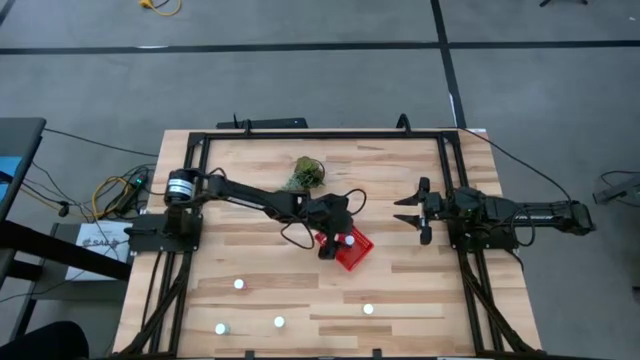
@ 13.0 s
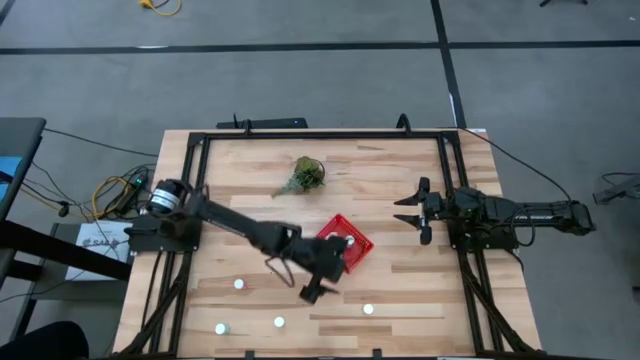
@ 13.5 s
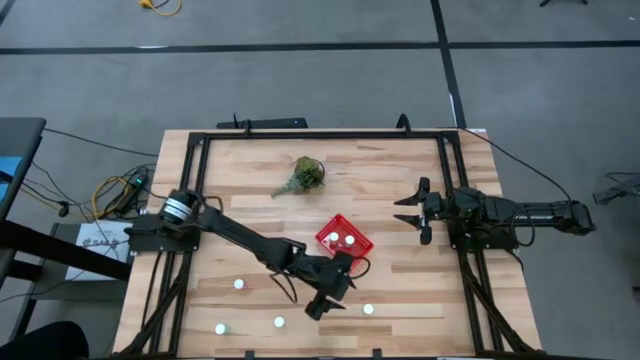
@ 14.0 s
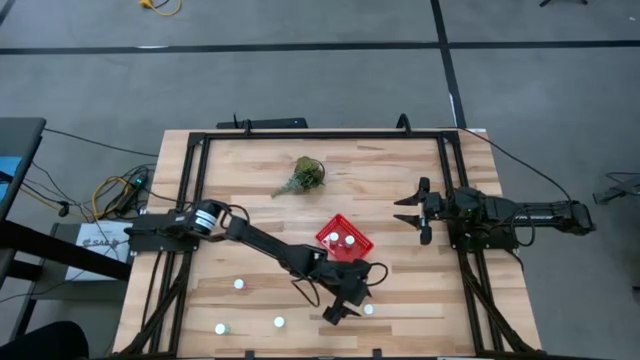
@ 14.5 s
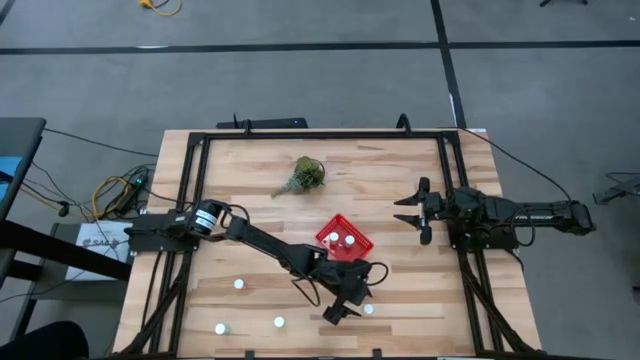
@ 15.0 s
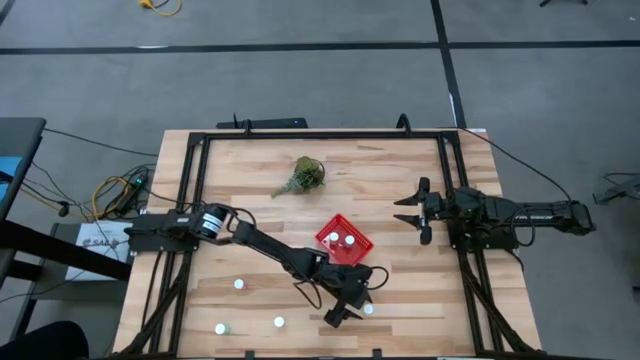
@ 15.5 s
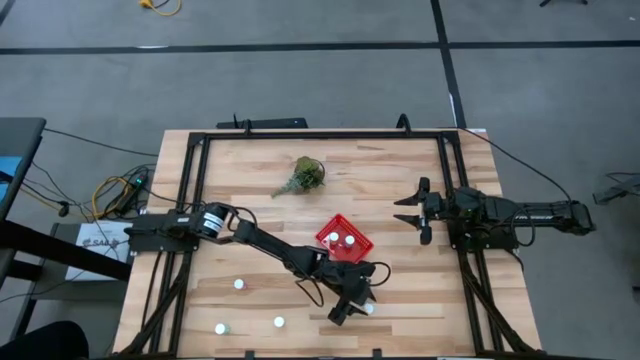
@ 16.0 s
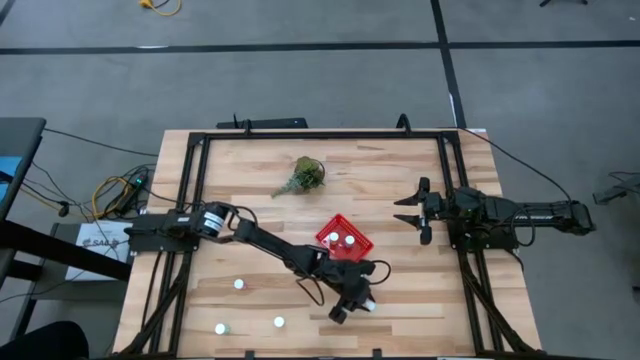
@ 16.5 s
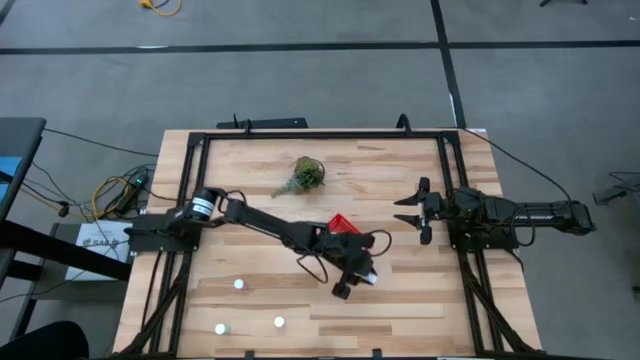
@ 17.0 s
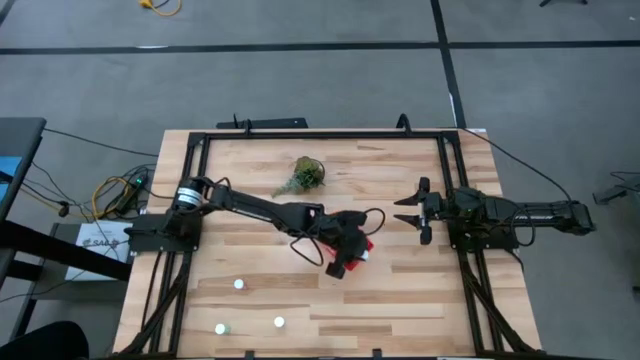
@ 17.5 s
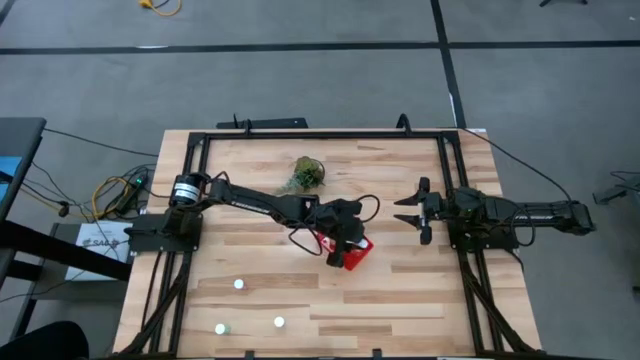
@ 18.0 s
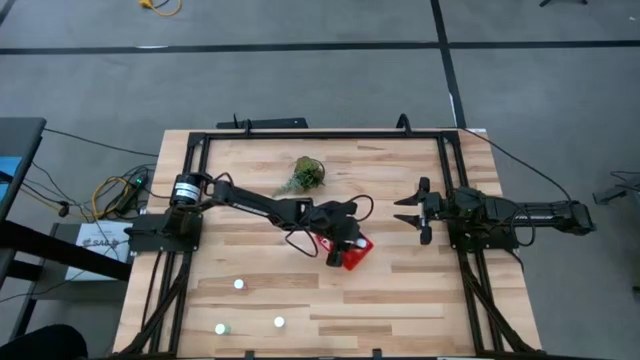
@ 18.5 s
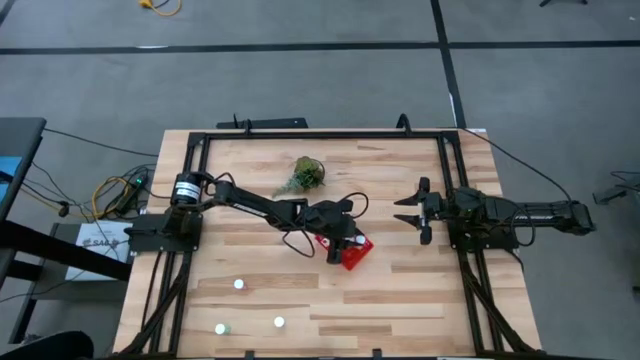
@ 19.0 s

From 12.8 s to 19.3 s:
Task: Pick and place pill bottles into a basket
Put the right yellow pill bottle into the red bin

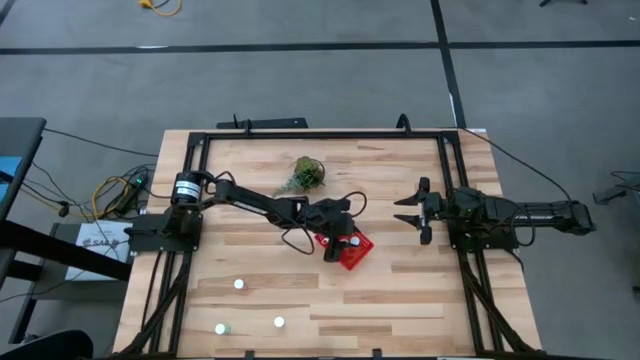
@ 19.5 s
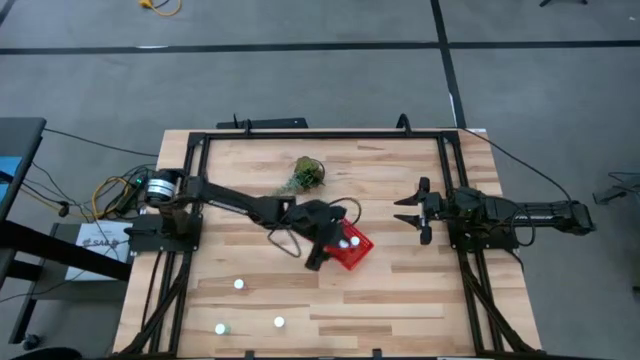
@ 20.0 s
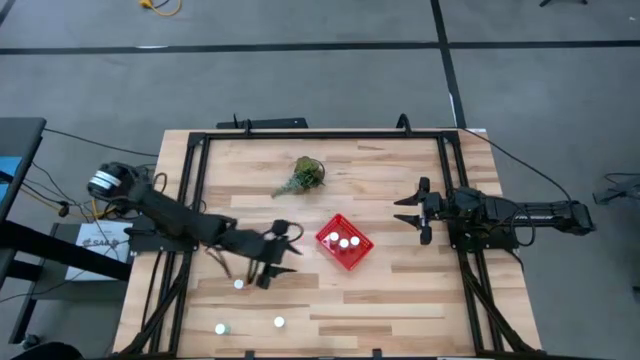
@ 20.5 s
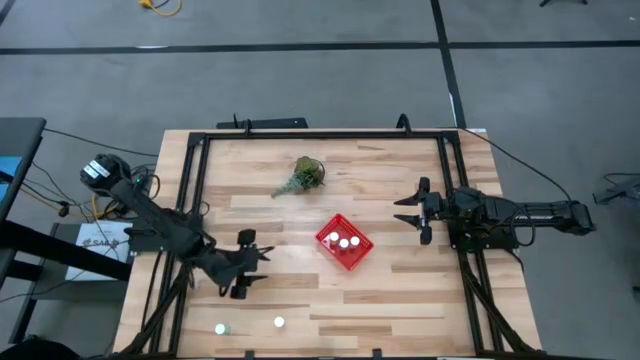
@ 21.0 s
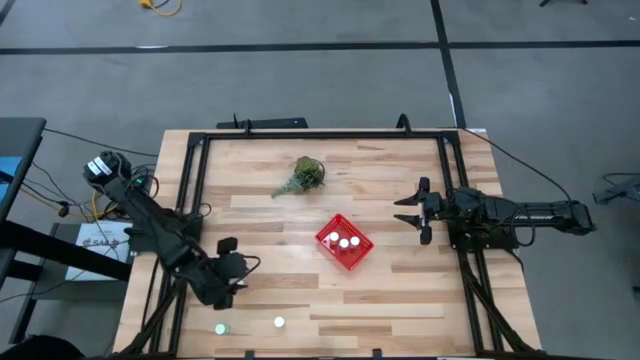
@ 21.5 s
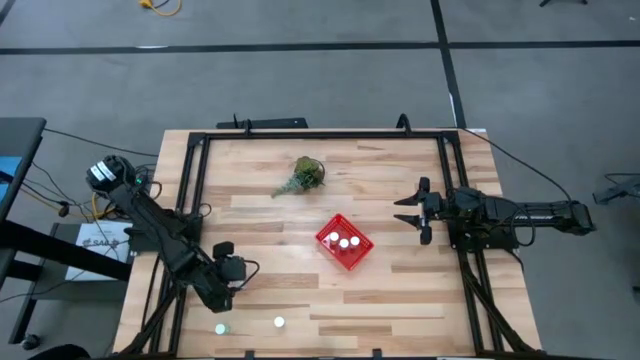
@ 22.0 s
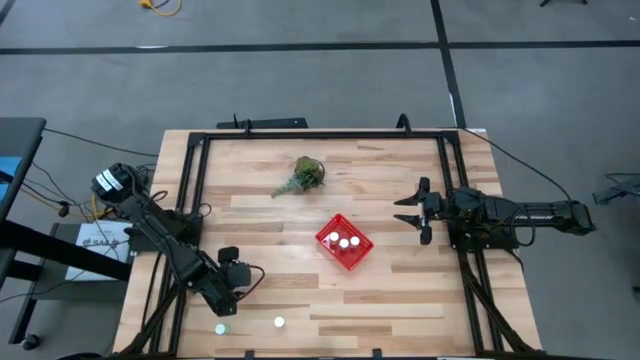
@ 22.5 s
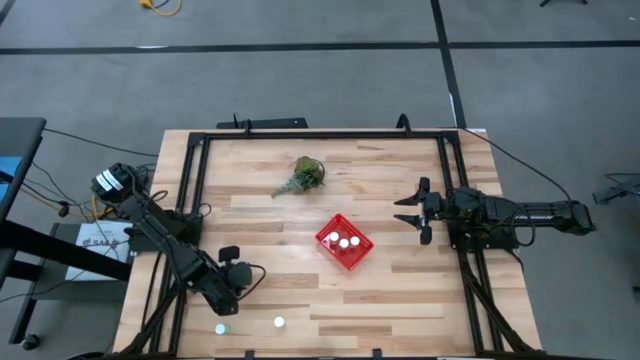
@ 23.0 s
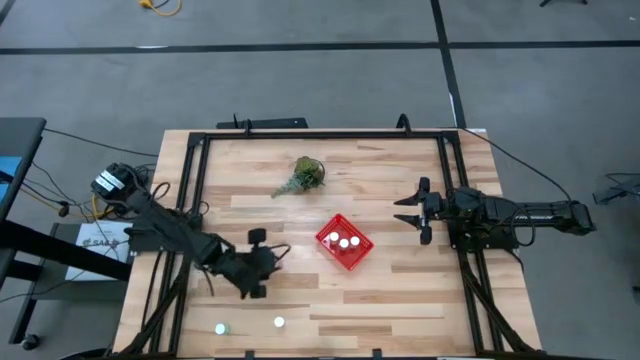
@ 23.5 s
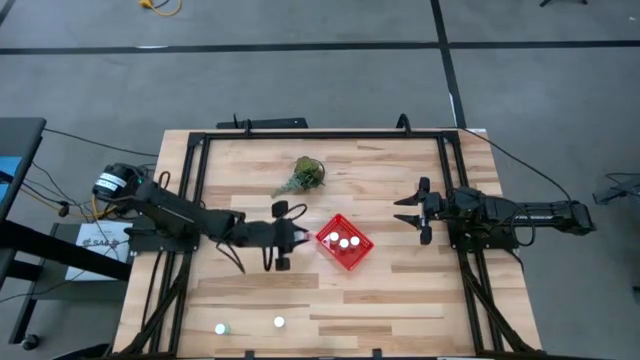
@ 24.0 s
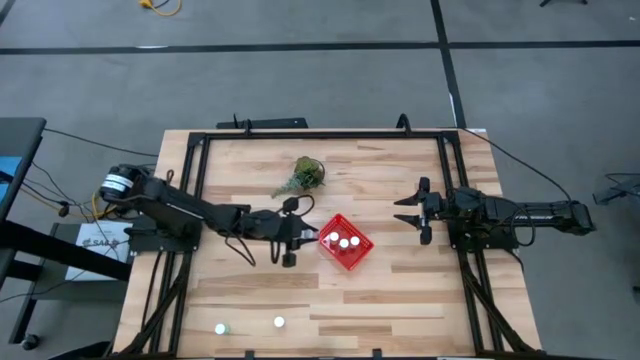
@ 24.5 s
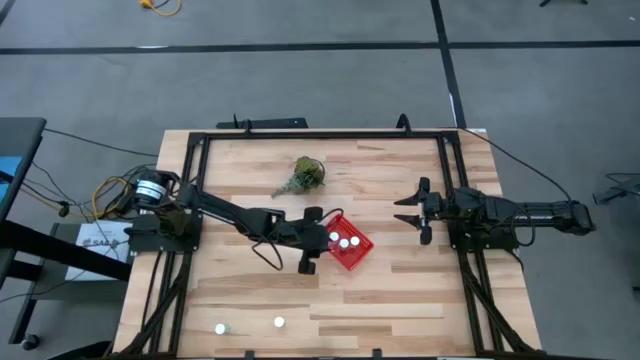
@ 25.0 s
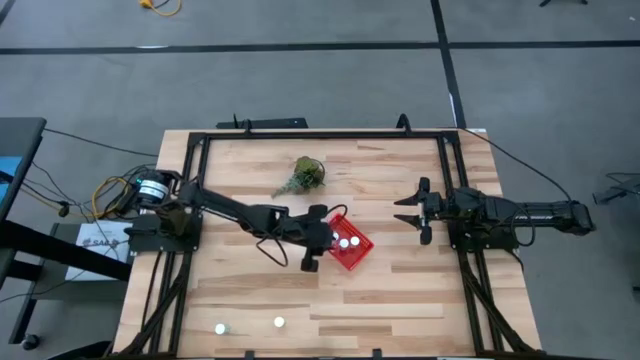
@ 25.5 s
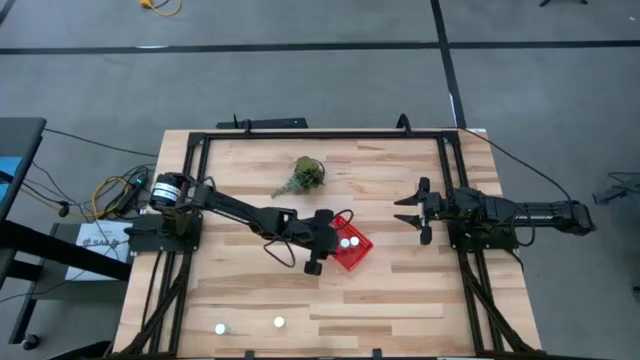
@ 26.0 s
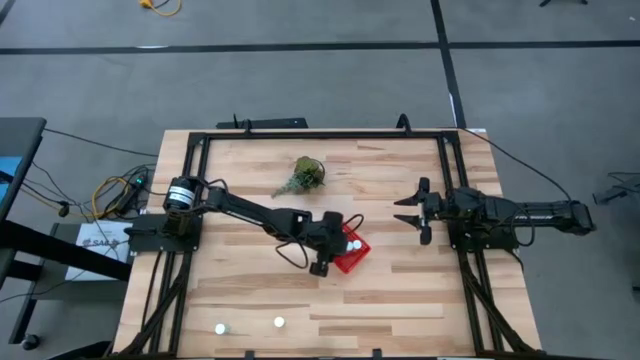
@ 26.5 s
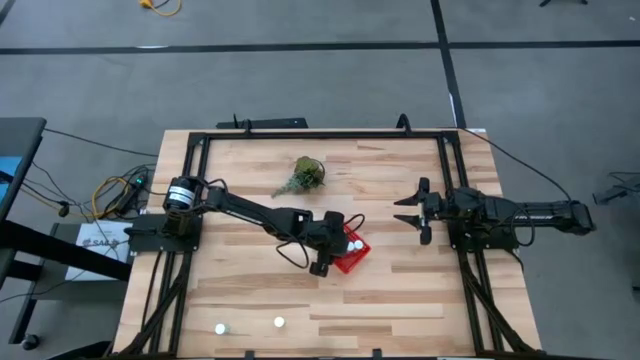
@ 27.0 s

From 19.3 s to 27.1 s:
Put the pink pill bottle into the red bin

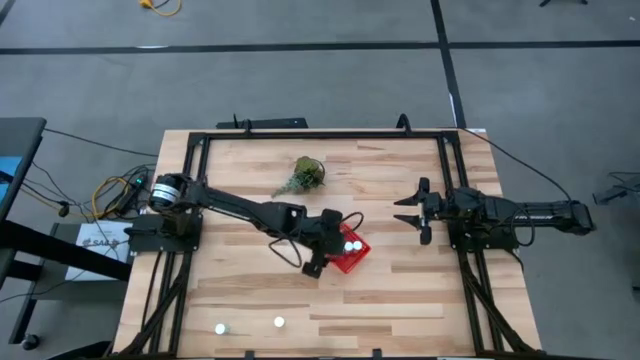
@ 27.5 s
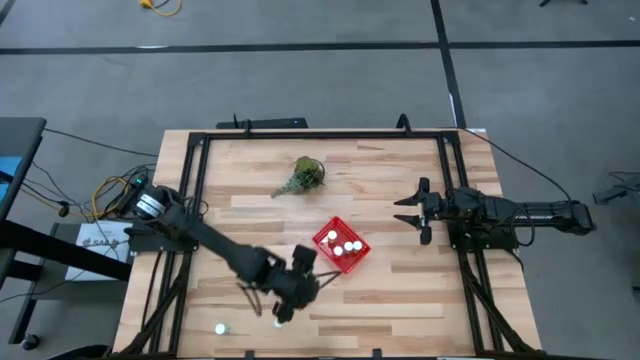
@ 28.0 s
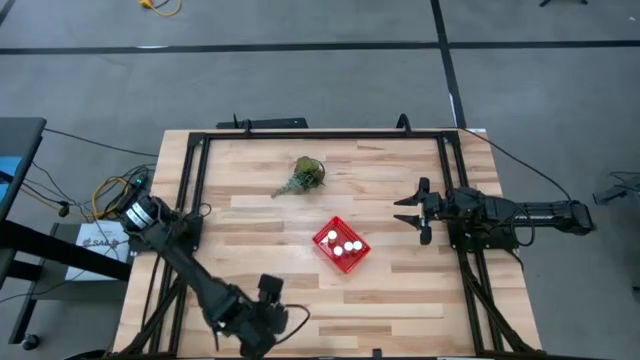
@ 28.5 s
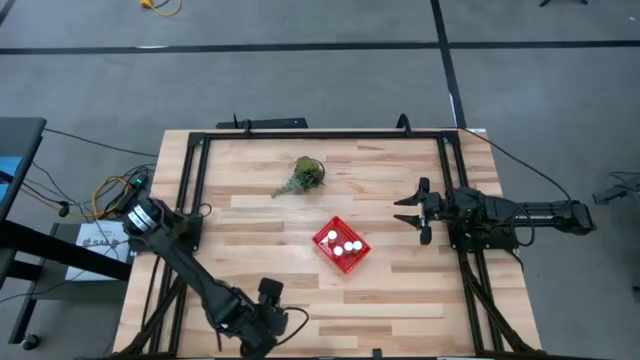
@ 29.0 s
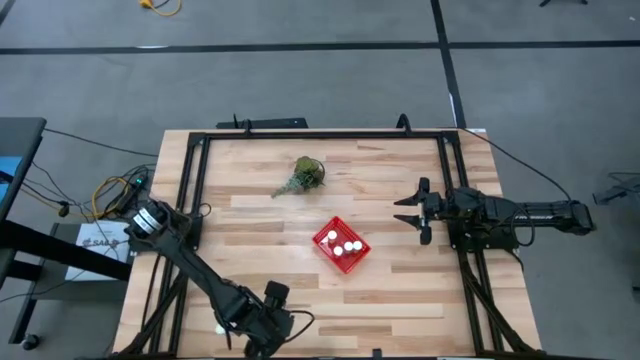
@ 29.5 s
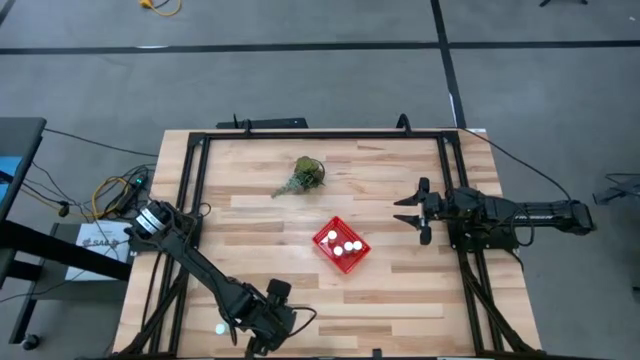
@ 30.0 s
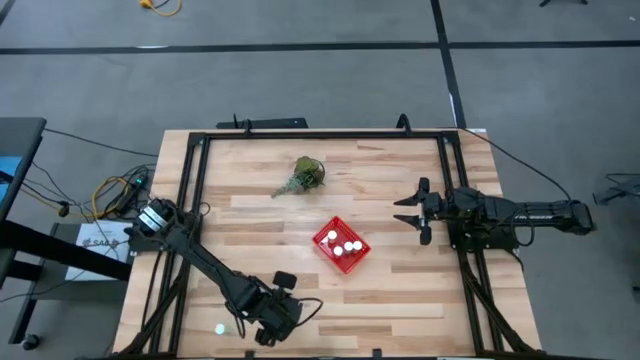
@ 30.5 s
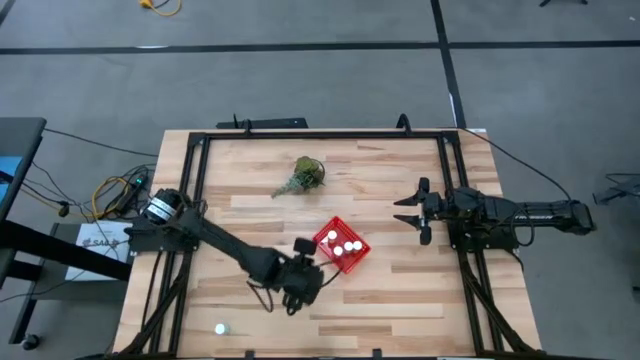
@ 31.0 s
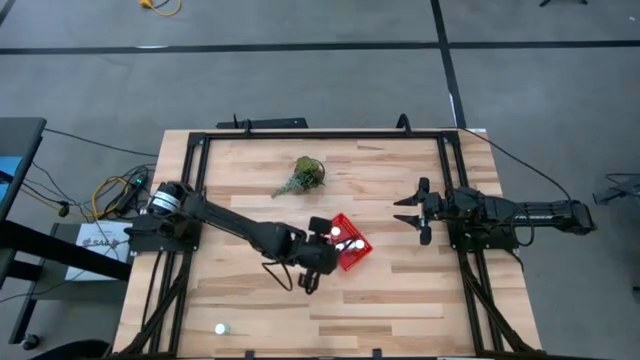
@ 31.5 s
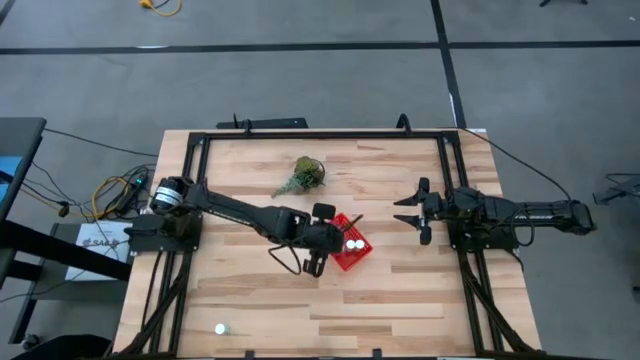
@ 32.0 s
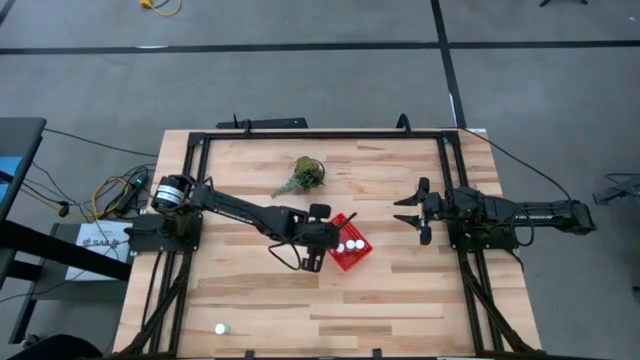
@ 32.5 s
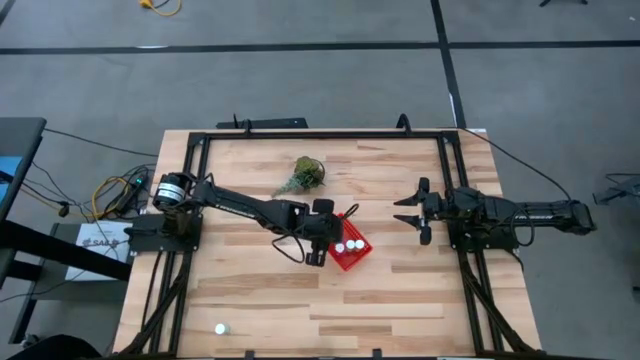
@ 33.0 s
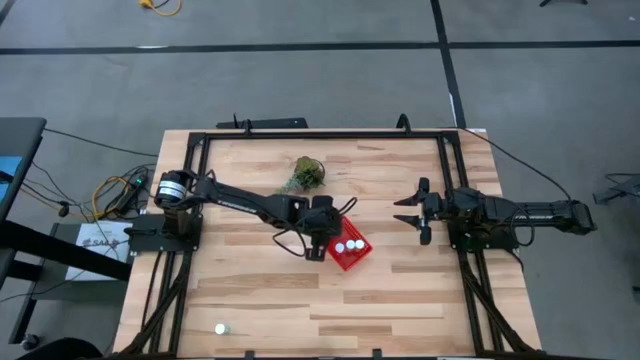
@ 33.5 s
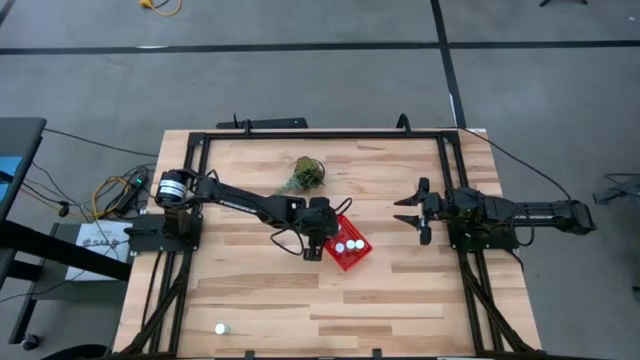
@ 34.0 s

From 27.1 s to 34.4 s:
Put the yellow pill bottle into the red bin
